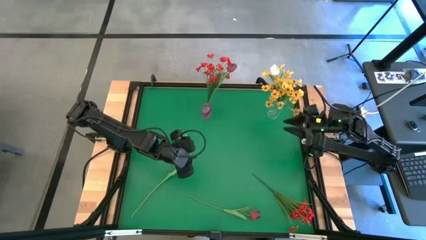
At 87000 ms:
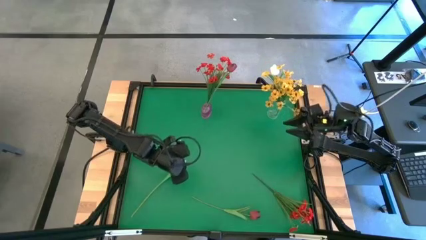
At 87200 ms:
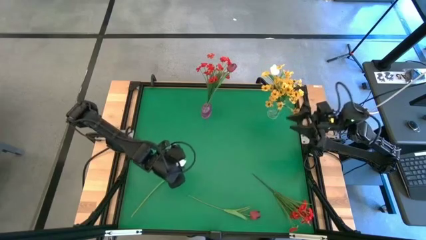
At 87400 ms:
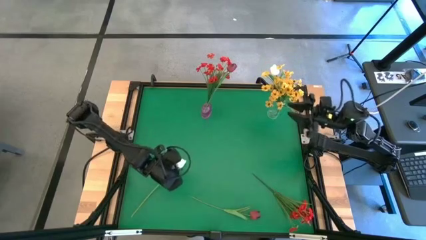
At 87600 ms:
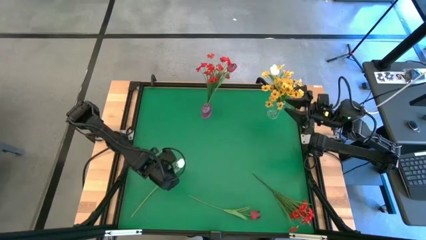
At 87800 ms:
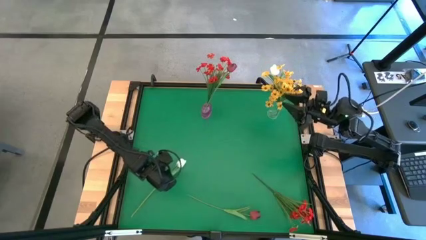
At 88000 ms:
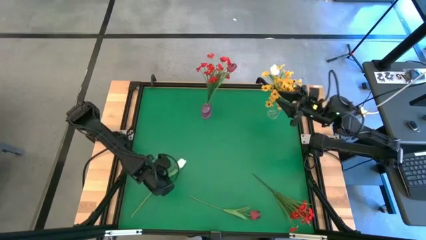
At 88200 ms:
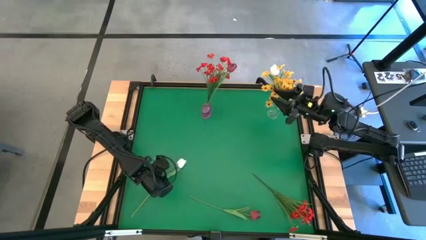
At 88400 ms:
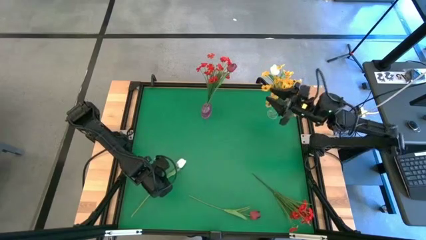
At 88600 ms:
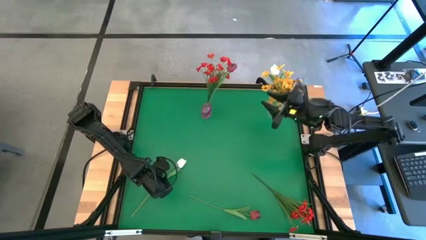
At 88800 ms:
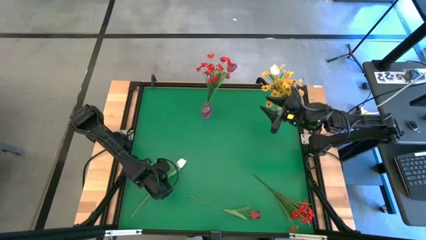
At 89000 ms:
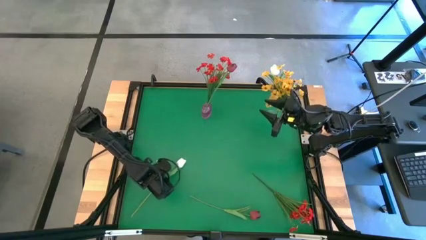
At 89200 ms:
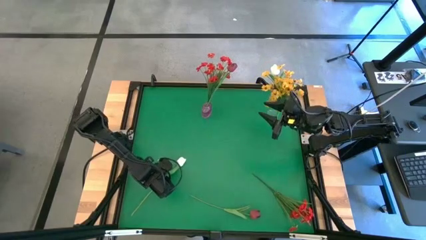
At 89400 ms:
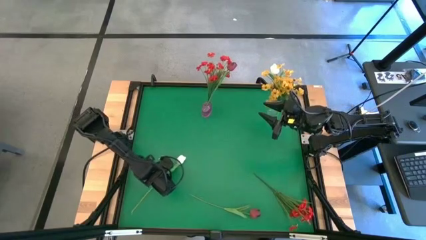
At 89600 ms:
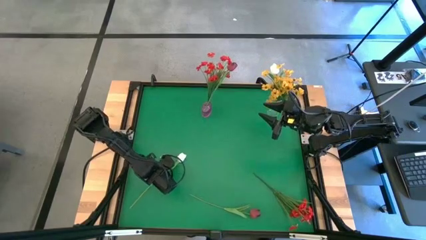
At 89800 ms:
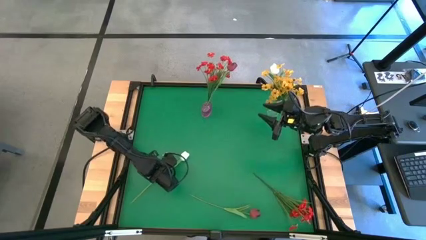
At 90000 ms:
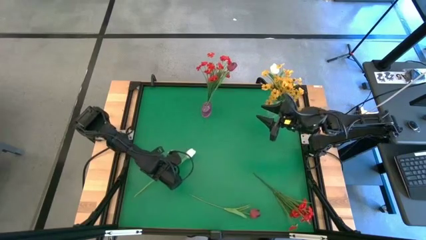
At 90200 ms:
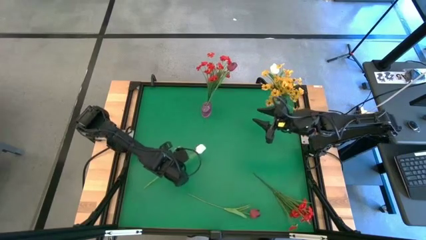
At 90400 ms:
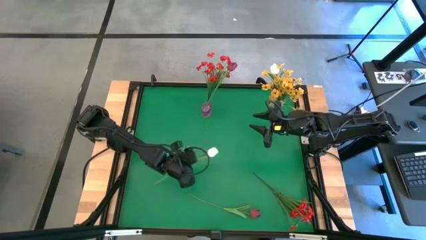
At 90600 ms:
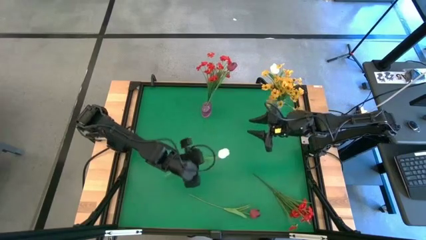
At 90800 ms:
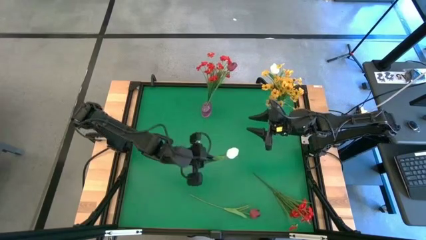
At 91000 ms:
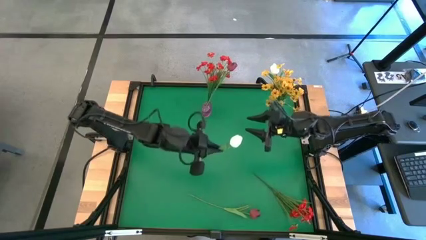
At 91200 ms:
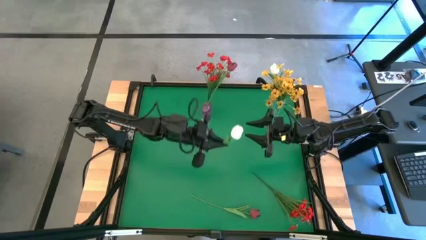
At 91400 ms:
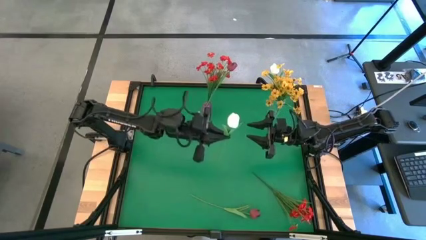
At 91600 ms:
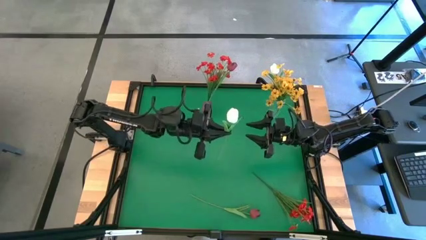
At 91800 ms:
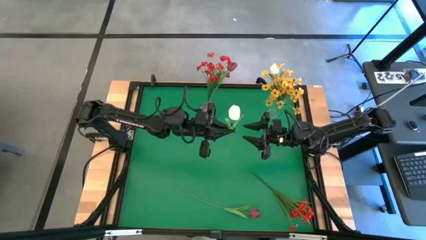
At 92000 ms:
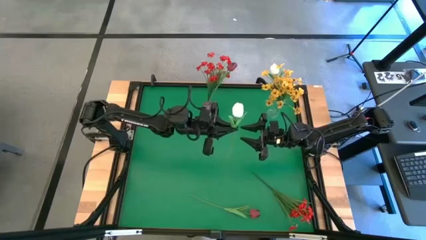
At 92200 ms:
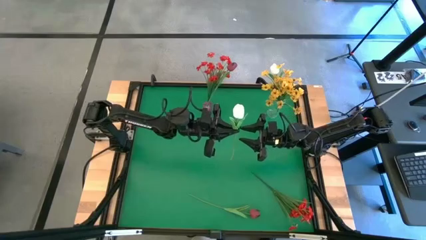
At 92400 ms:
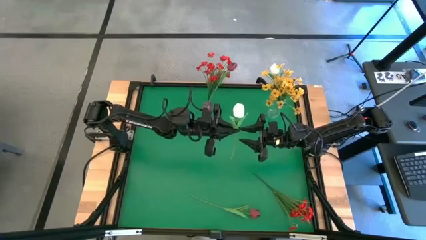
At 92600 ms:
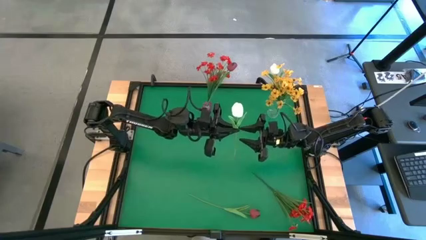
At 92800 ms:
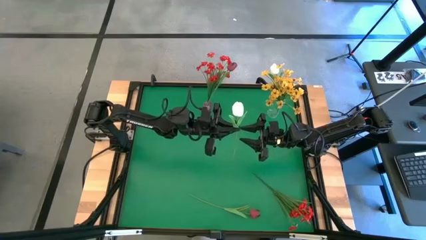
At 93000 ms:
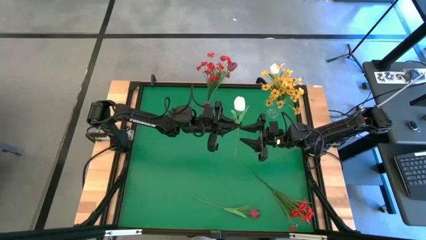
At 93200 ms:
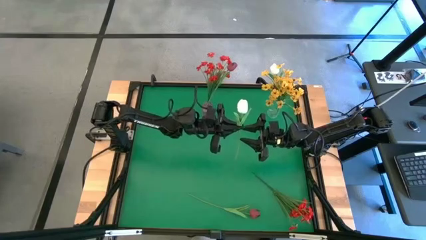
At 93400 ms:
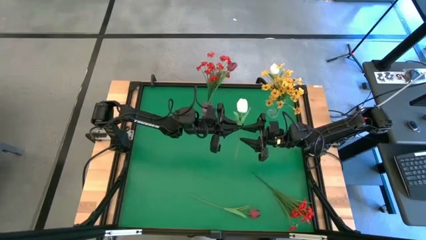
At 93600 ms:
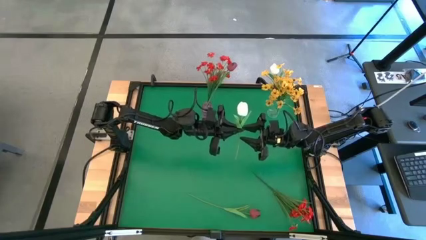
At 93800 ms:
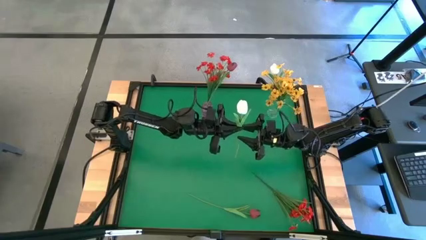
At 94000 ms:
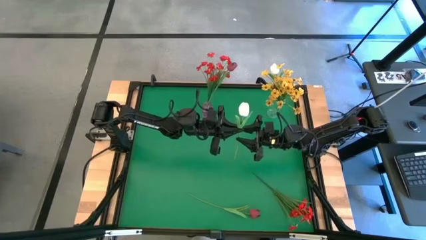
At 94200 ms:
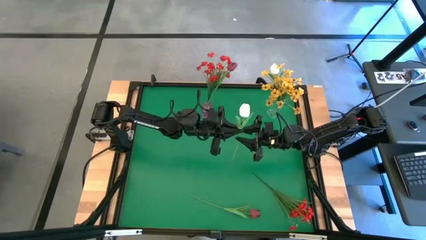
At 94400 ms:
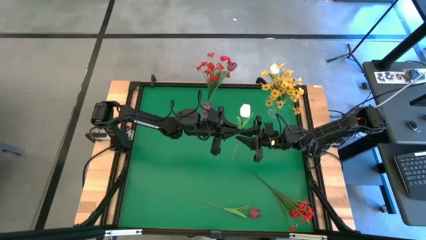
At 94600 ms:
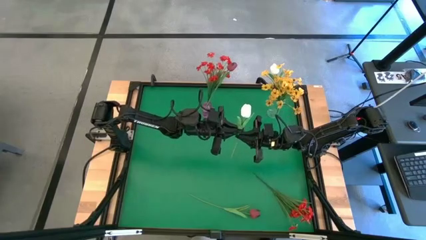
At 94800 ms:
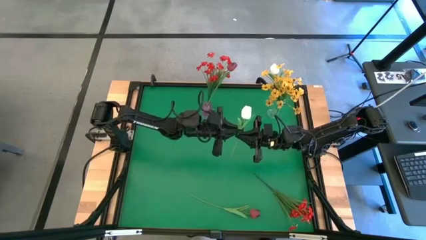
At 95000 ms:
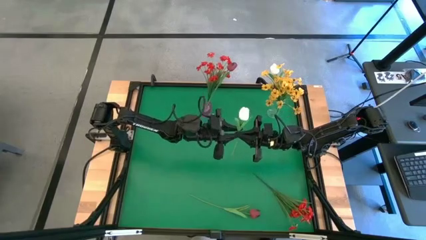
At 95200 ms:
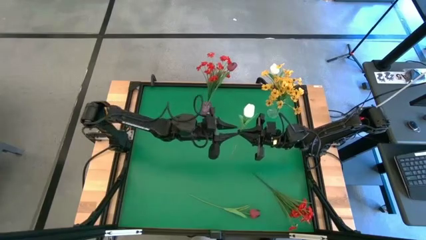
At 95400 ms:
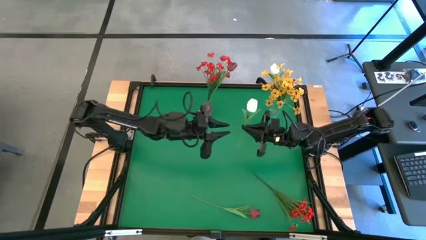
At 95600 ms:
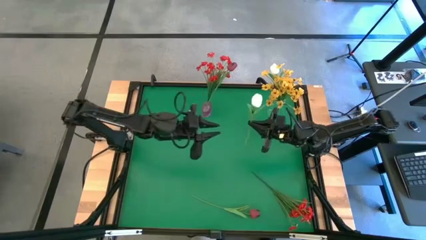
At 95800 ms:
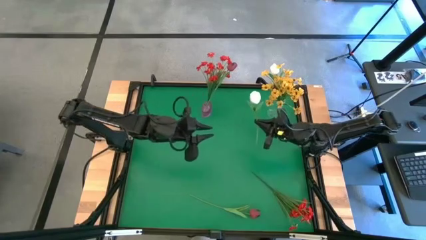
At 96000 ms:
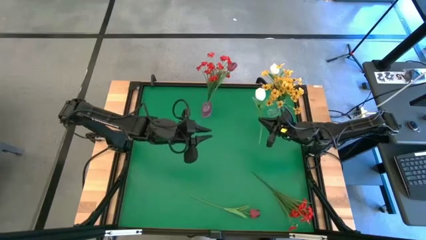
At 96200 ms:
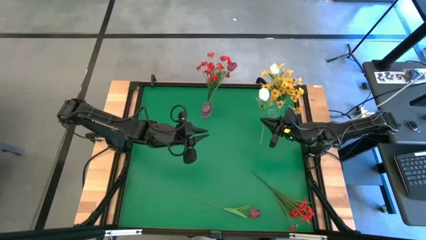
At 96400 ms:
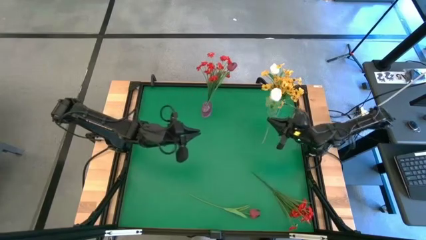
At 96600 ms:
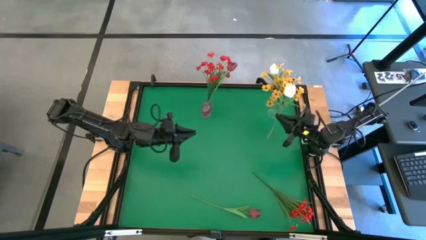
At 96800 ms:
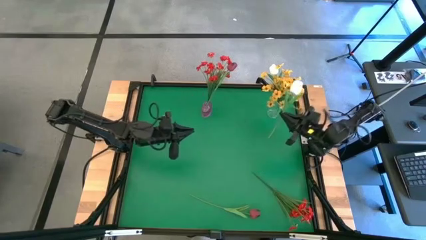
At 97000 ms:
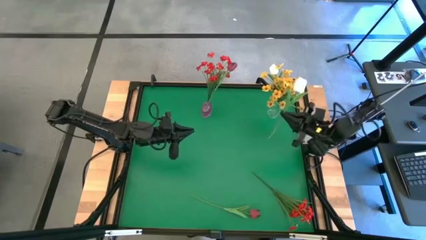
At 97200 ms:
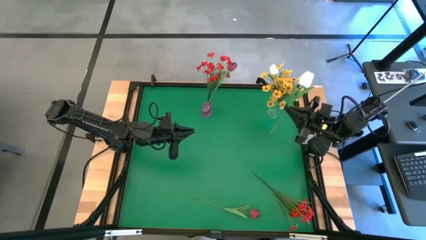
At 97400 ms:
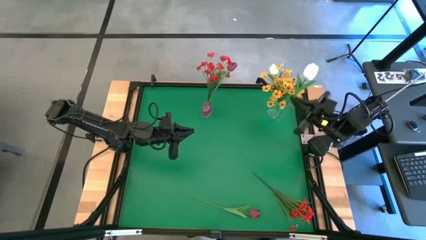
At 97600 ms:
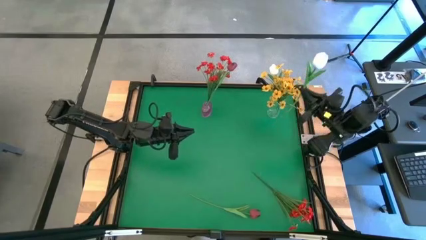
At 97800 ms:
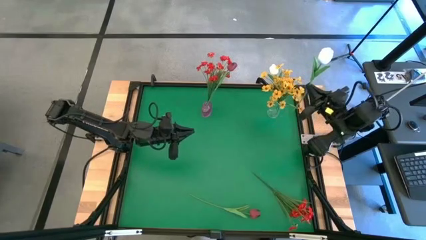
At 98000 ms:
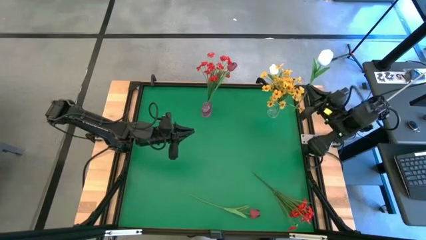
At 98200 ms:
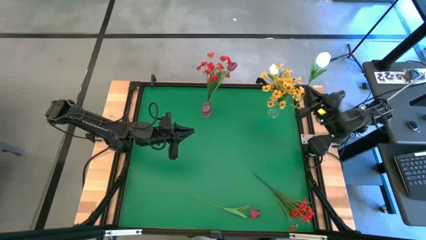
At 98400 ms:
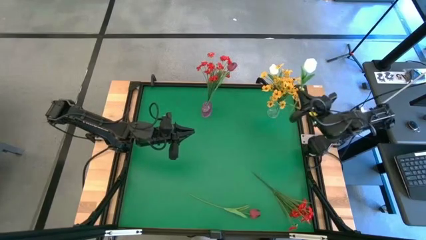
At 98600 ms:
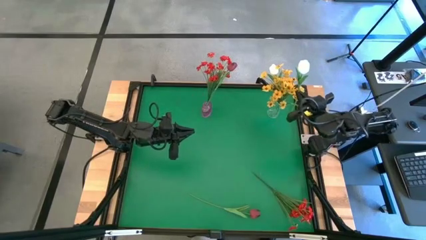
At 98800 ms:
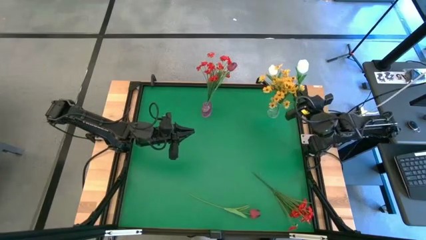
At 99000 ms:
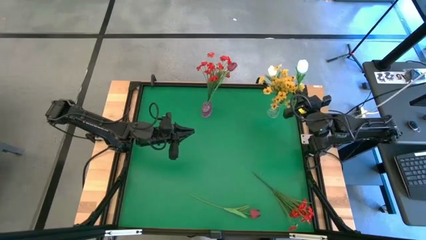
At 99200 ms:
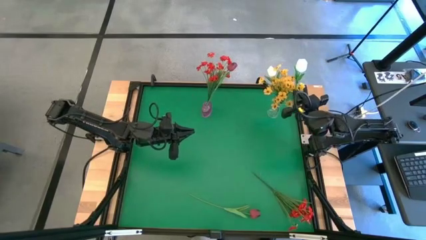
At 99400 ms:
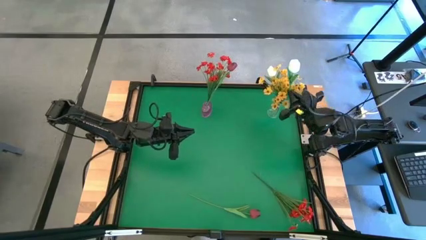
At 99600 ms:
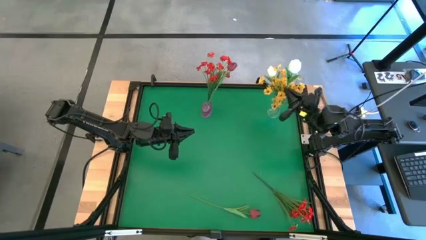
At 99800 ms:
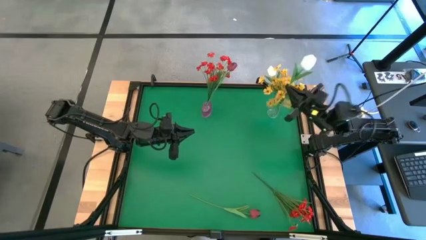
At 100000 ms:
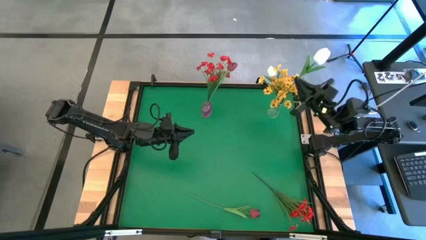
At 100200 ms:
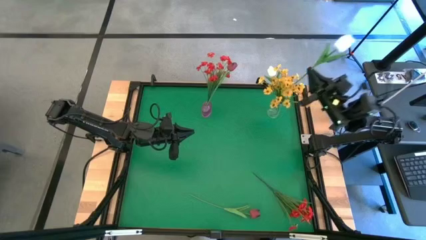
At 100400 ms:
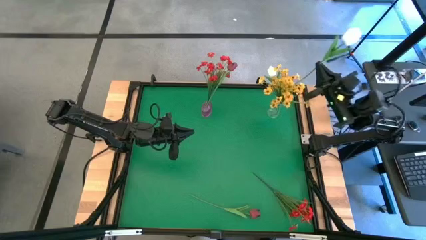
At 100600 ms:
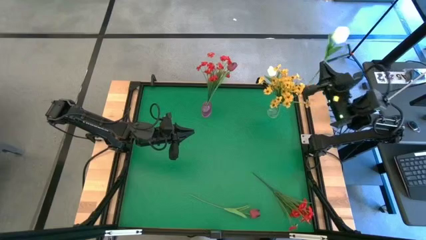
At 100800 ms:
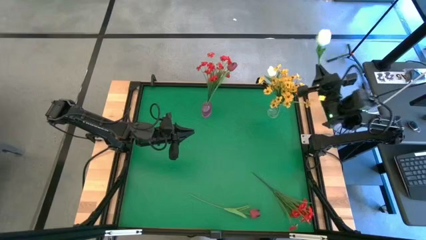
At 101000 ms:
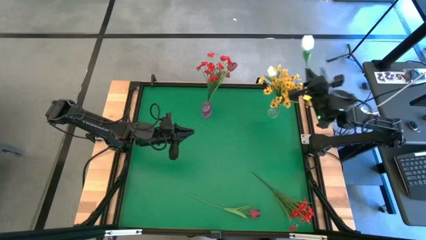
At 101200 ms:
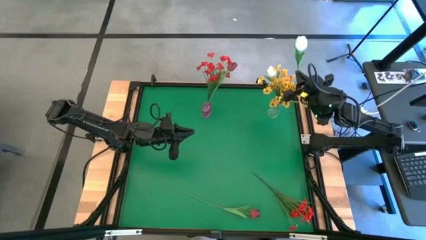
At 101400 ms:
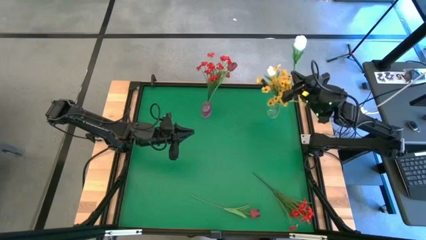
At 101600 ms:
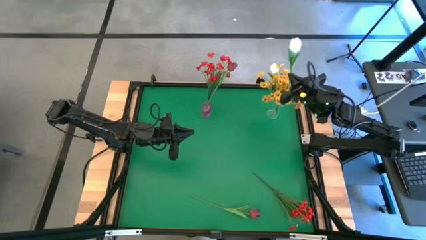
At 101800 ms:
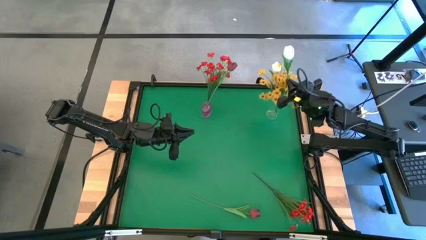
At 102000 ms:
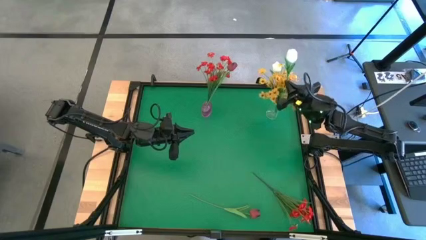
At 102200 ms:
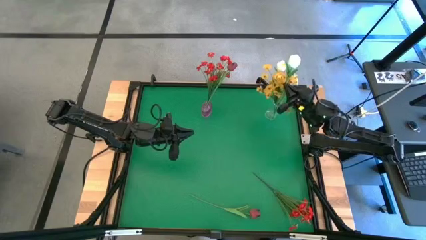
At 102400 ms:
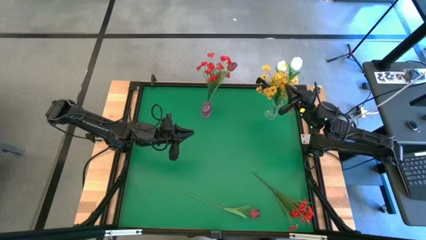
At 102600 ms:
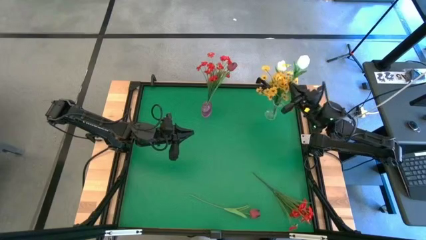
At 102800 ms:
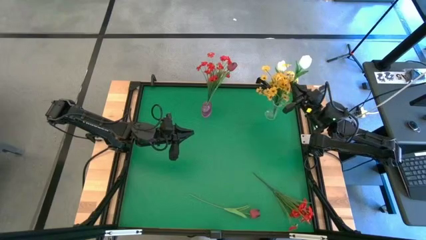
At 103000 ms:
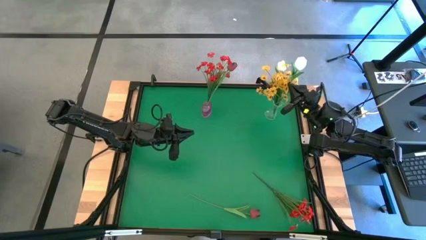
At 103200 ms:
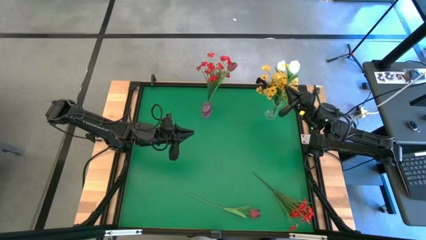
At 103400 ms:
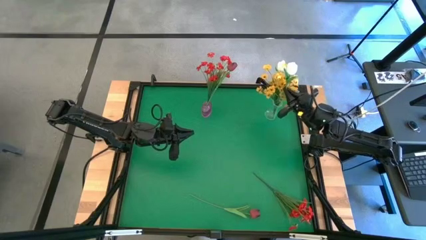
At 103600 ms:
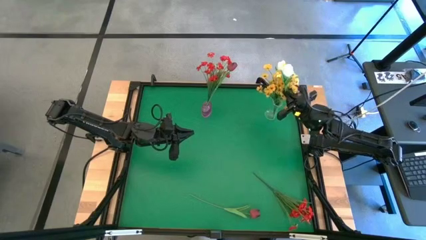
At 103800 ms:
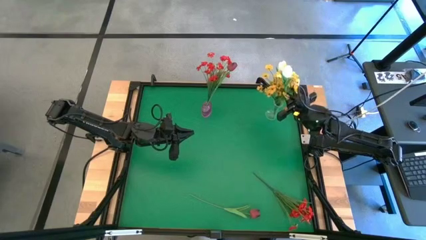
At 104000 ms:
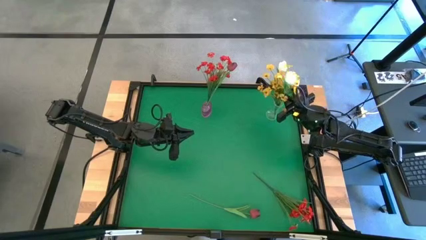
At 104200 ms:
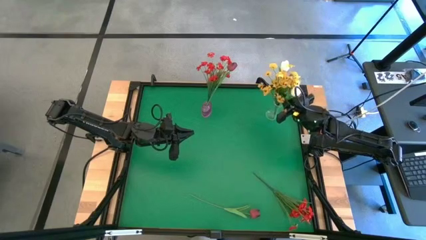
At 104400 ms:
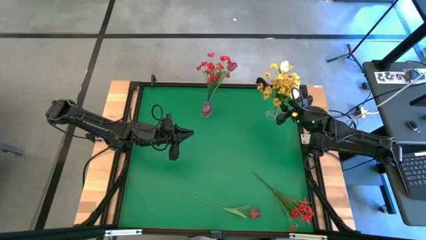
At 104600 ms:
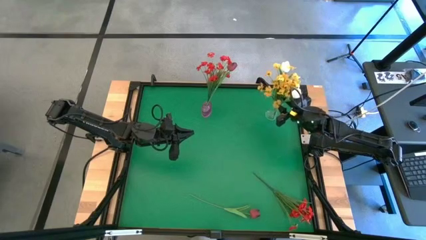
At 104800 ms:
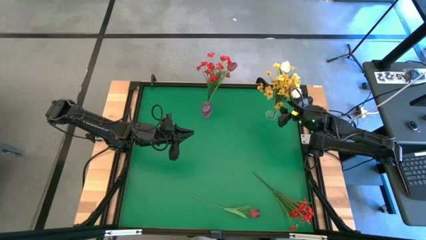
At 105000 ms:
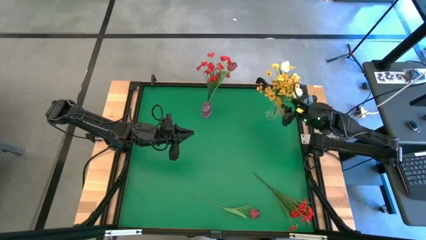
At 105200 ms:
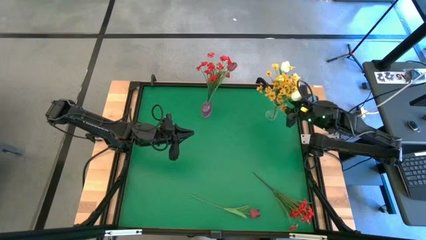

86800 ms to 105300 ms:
Task: Sort flowers into vase by color
Put the white flower into the transparent vase
